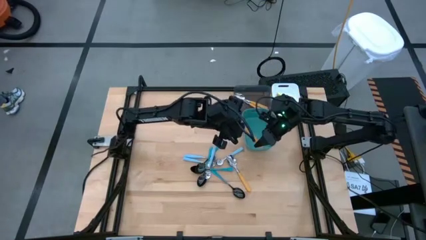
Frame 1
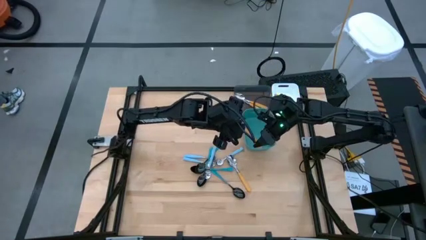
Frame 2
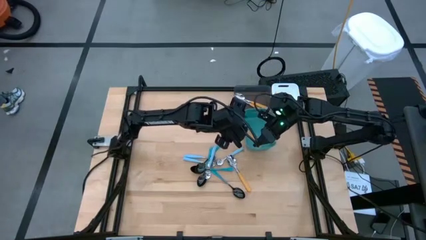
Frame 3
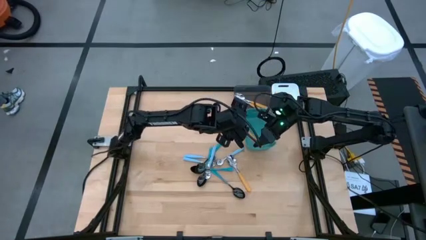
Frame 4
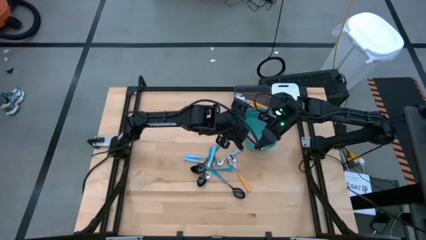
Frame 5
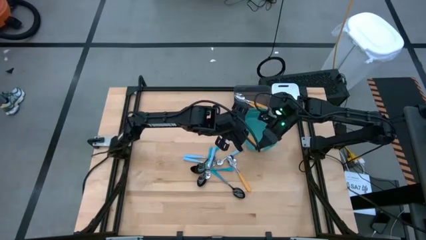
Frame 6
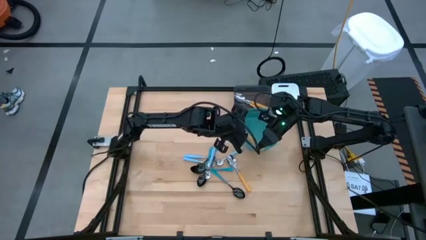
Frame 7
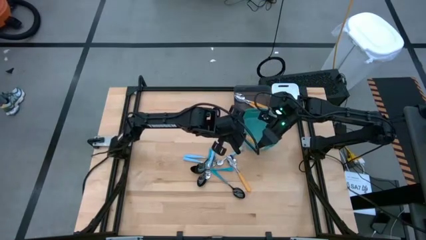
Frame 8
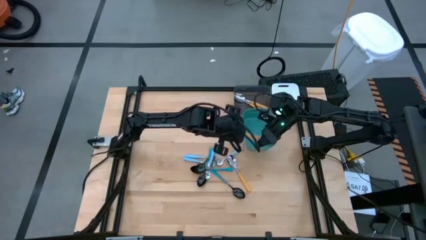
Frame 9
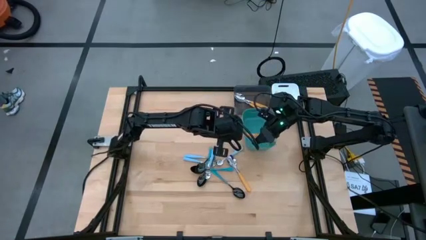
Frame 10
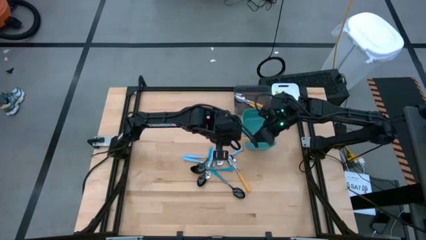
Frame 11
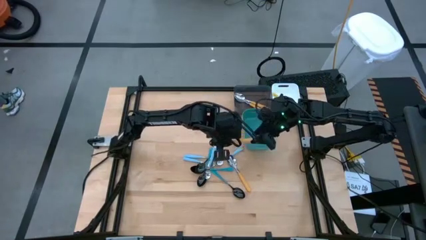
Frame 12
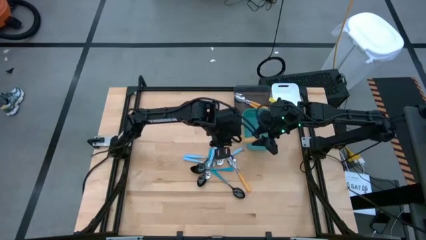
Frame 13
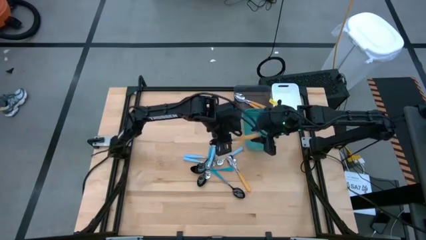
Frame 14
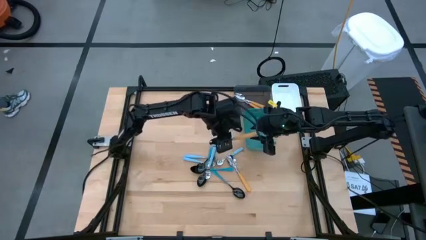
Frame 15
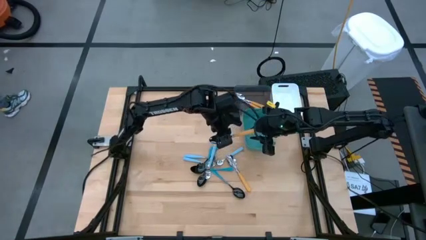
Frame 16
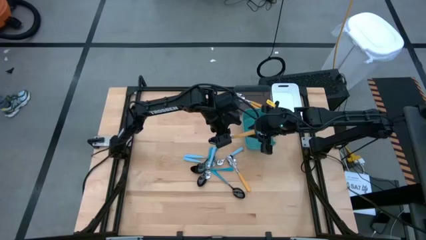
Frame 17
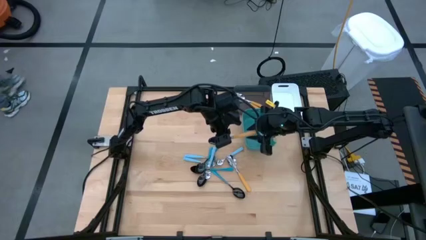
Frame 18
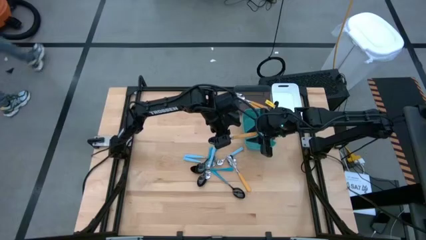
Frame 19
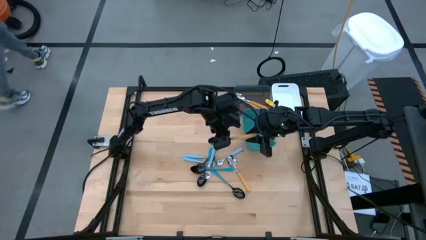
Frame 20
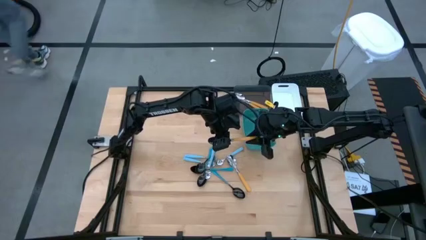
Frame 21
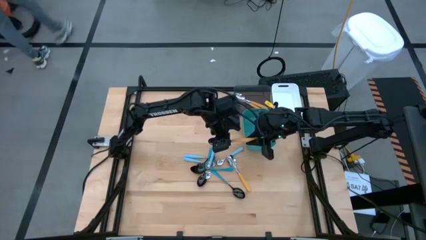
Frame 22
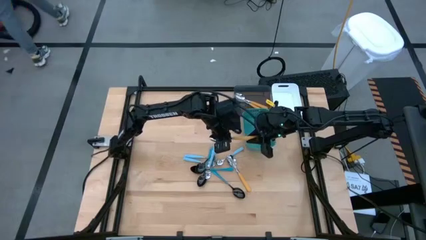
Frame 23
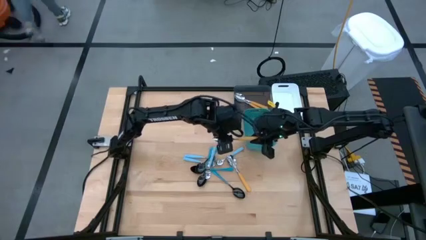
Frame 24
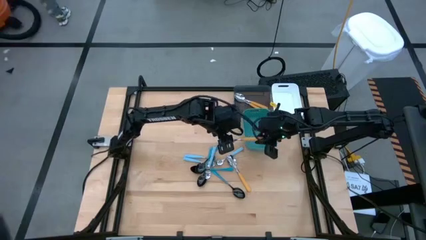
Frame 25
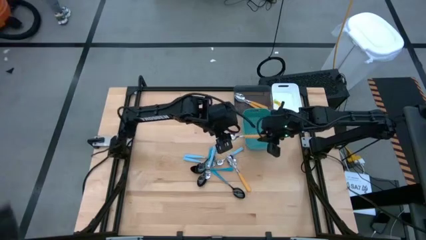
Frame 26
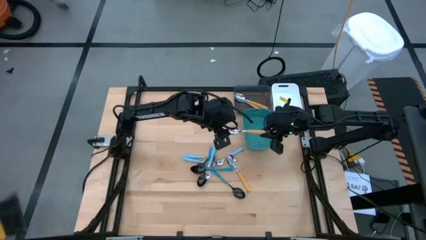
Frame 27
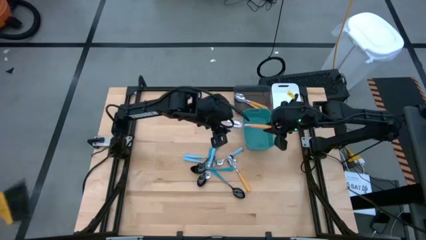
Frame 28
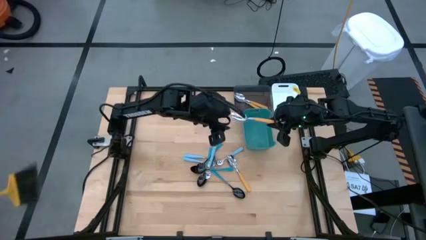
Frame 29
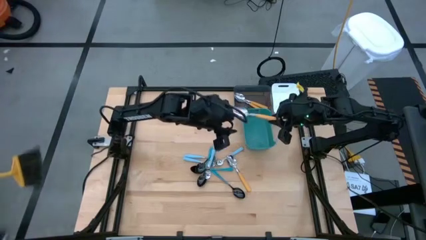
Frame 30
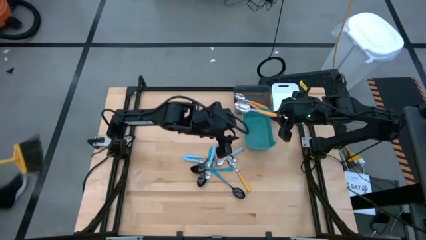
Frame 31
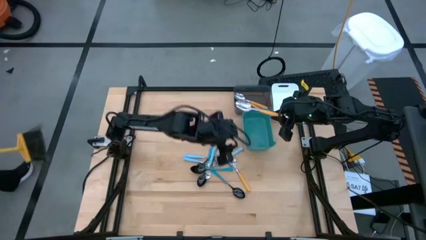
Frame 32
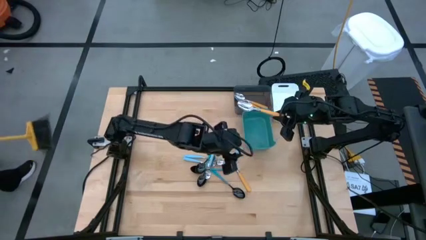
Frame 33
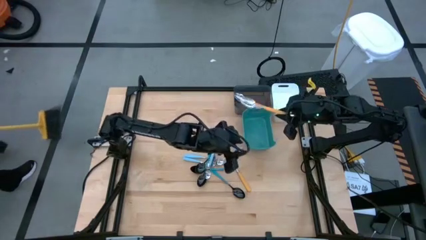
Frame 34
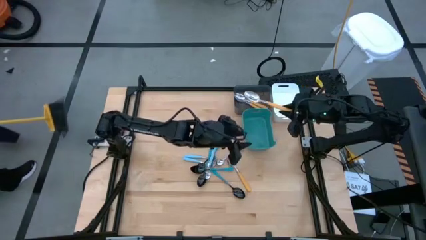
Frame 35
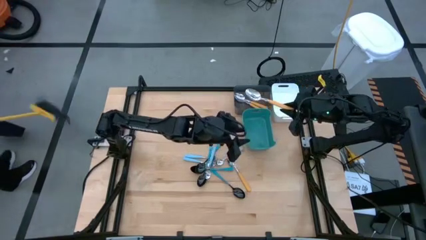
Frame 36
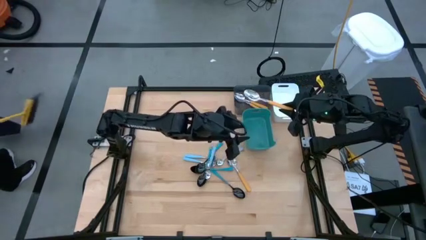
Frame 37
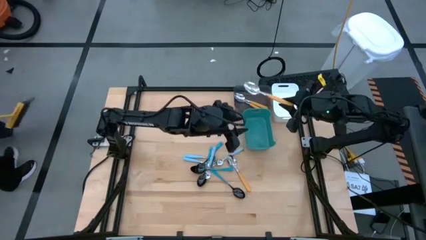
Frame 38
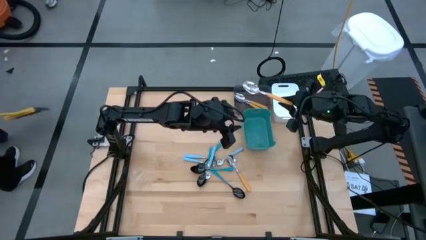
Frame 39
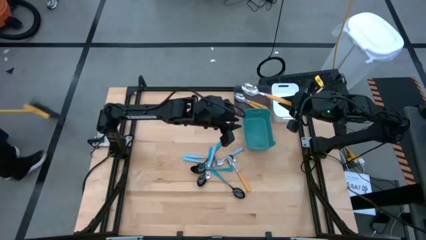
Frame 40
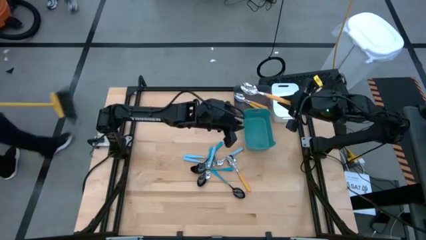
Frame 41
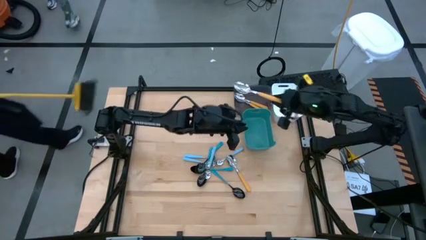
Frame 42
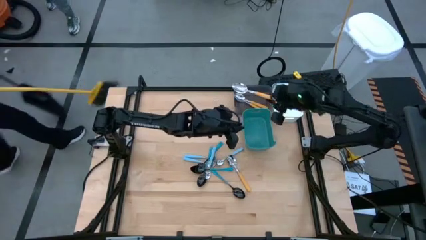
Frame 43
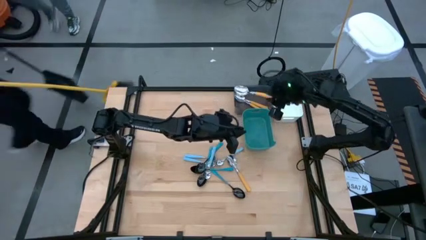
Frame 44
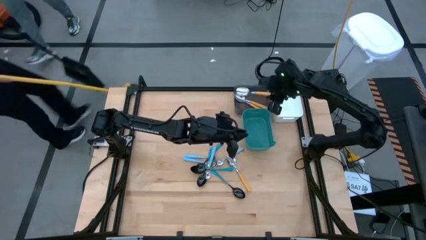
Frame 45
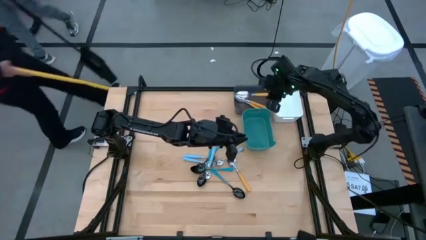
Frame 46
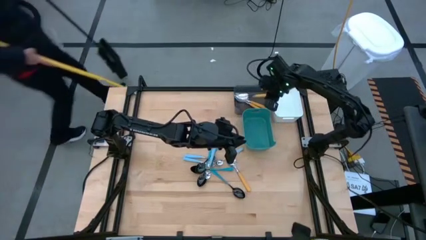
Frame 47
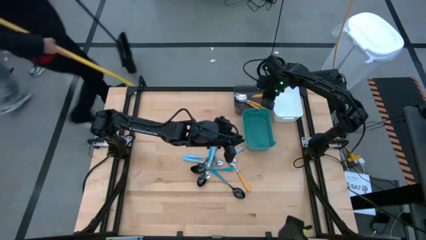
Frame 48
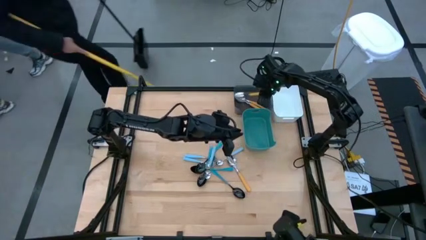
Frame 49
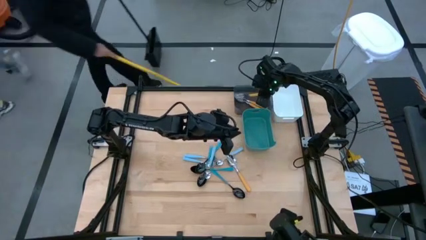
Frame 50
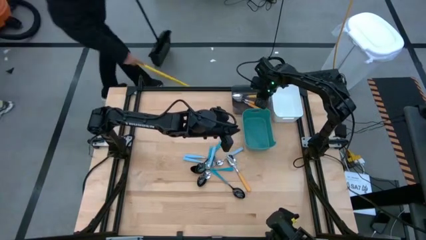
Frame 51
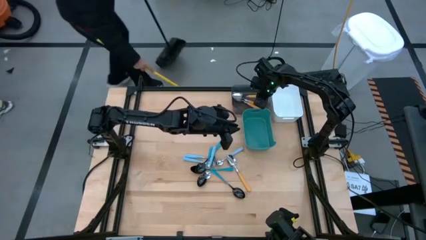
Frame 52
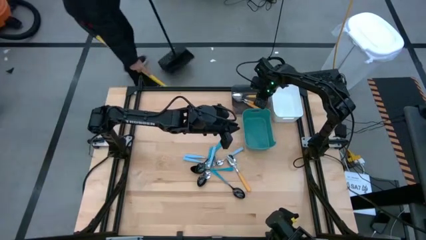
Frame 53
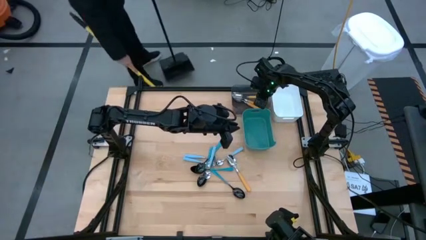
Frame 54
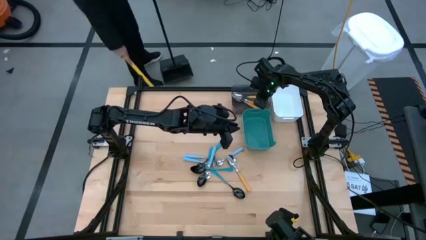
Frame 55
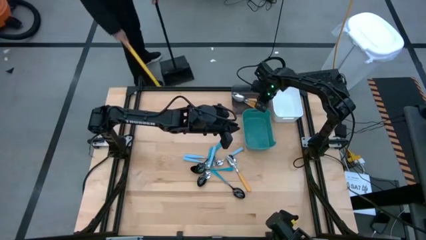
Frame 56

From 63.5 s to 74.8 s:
Task: Sort silverware by color (type)
Put the orange spoon into the black bin

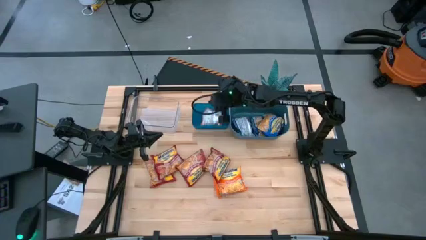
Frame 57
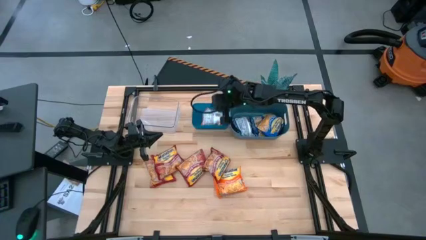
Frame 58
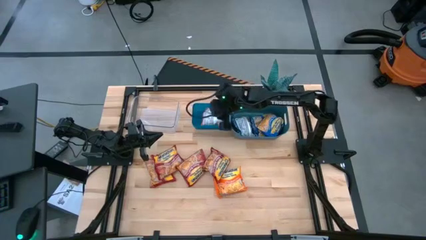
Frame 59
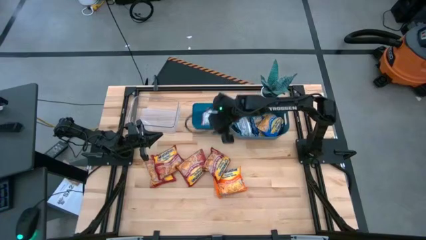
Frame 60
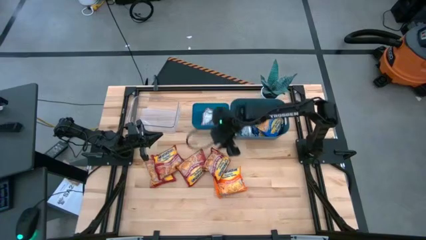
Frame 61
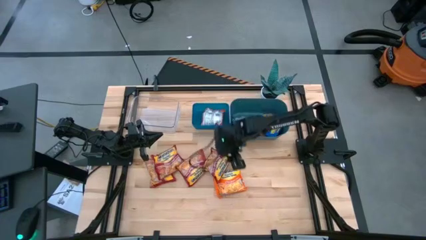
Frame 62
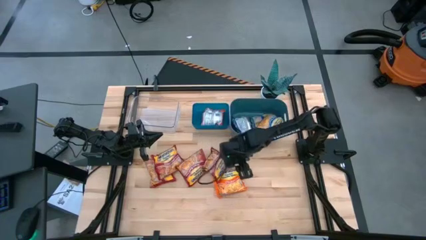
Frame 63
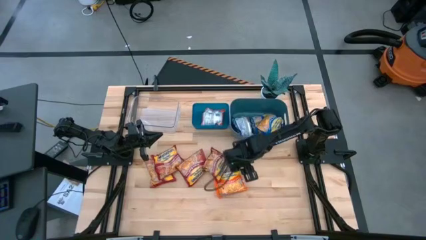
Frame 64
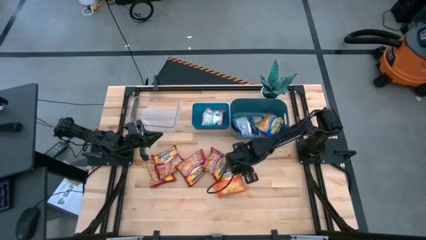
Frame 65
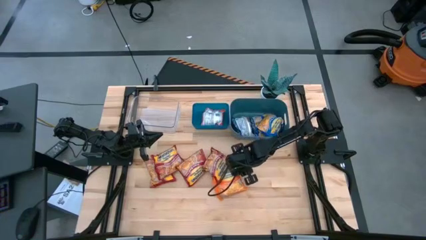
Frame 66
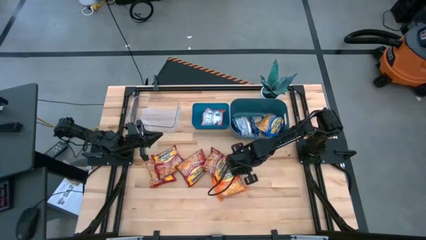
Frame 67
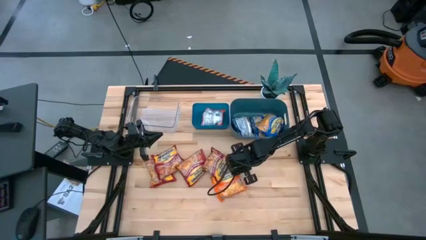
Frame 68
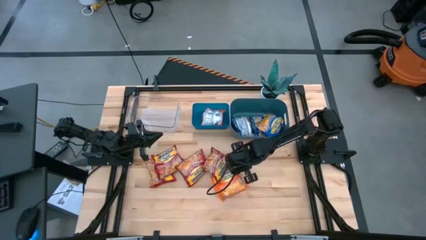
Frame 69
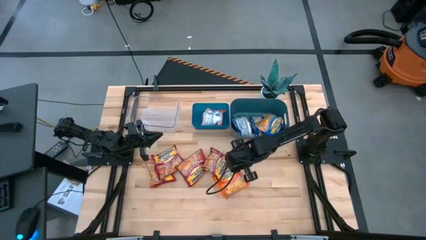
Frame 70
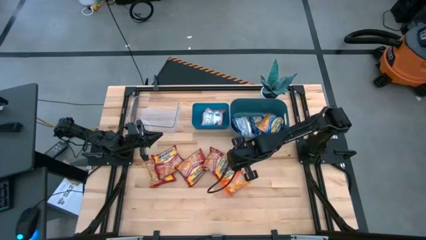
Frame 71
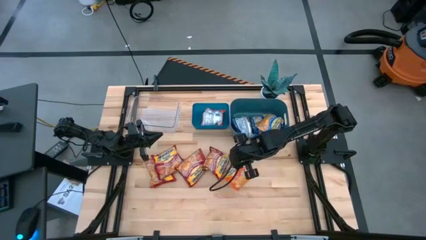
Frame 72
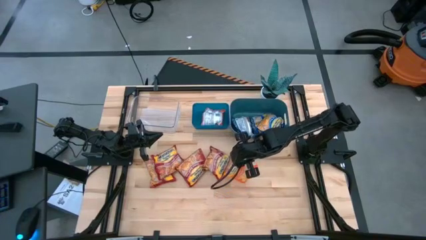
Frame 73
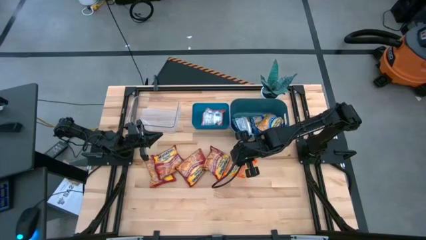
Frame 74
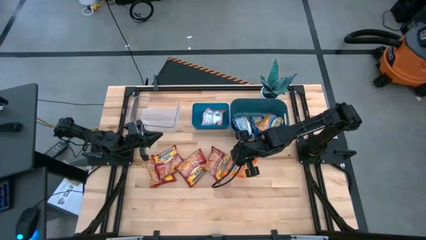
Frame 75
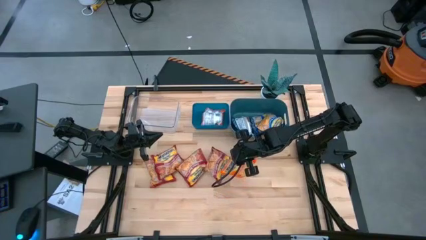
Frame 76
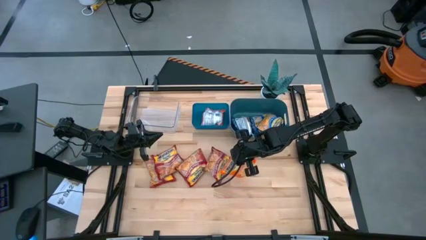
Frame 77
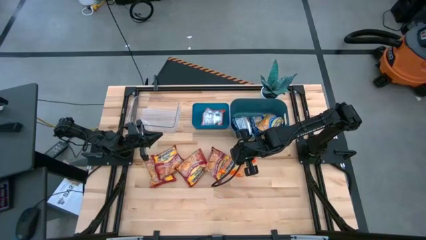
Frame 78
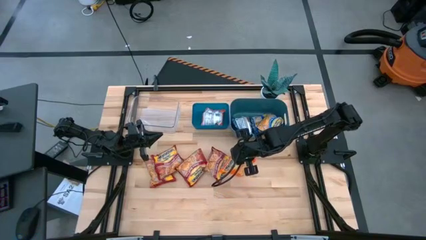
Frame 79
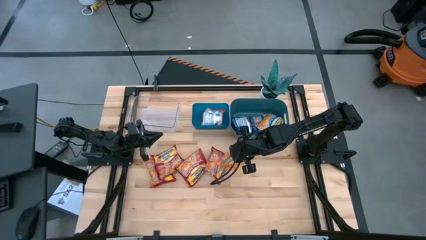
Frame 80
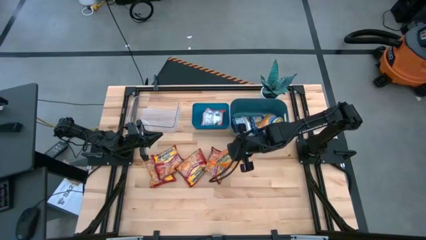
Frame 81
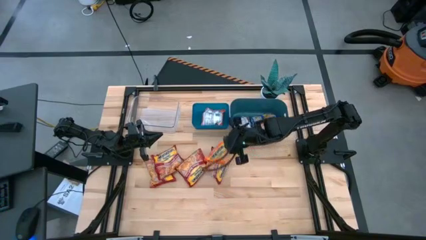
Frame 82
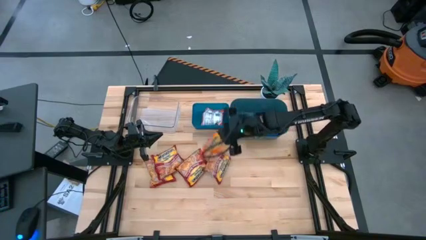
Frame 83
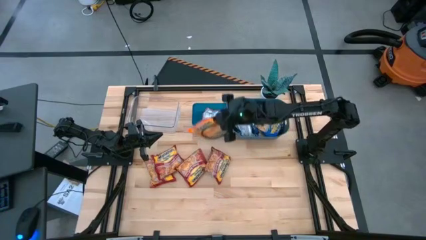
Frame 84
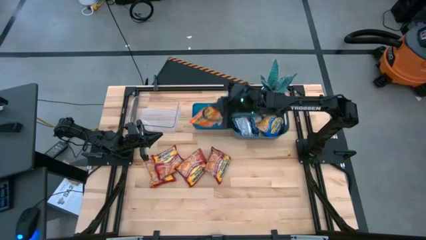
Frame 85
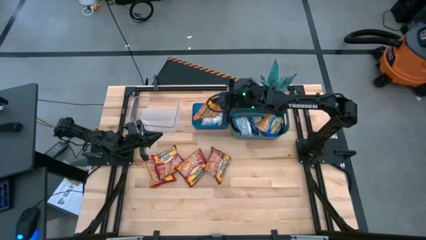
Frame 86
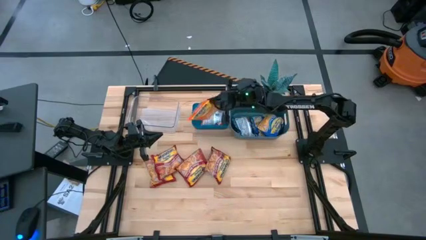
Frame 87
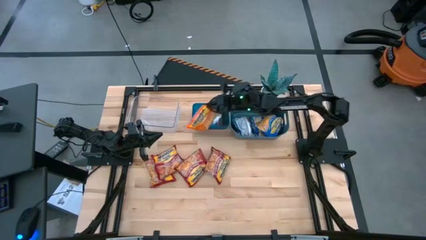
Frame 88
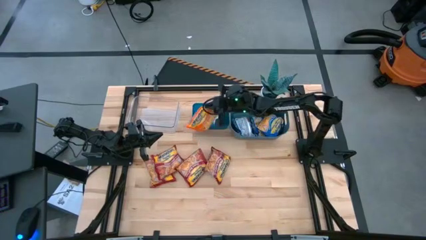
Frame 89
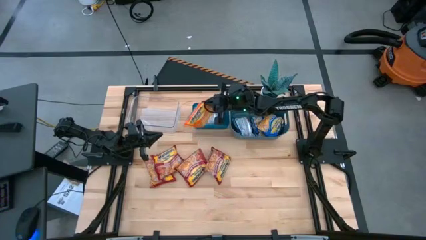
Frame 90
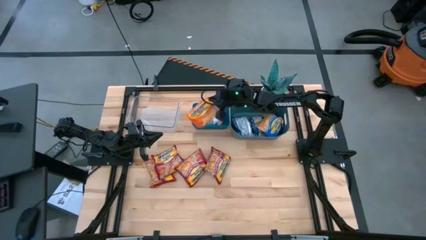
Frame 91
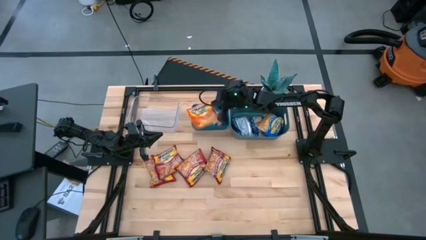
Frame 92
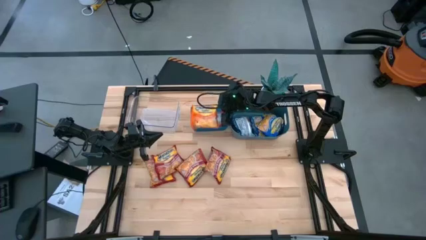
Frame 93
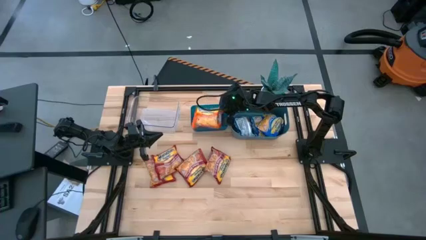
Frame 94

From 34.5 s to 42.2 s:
Task: Sort Maruchan noodles
Put the orange noodle pack into the blue bin
